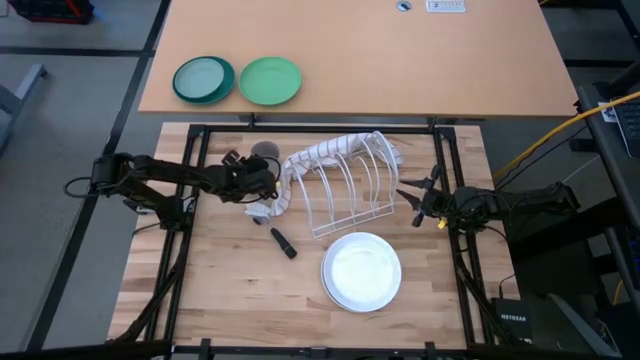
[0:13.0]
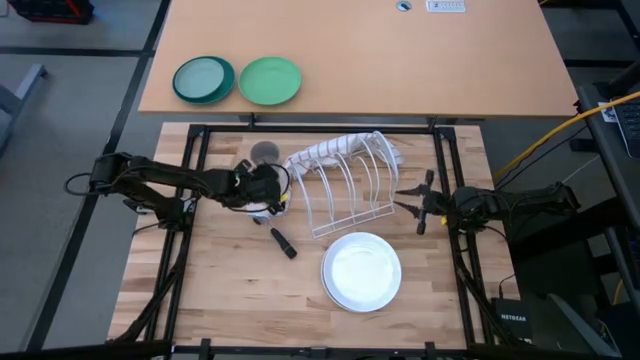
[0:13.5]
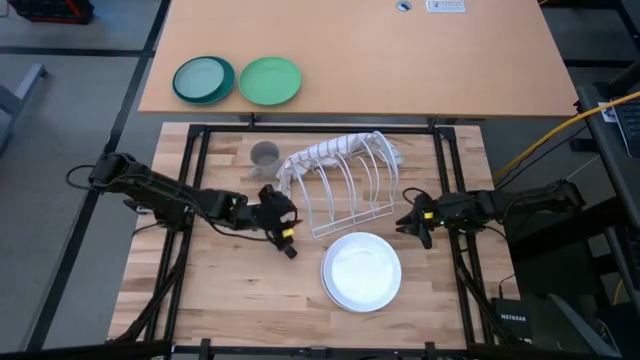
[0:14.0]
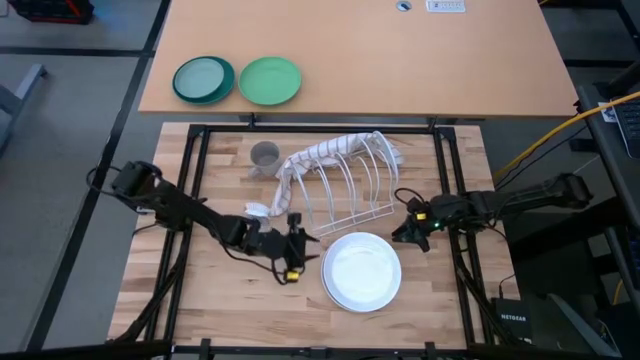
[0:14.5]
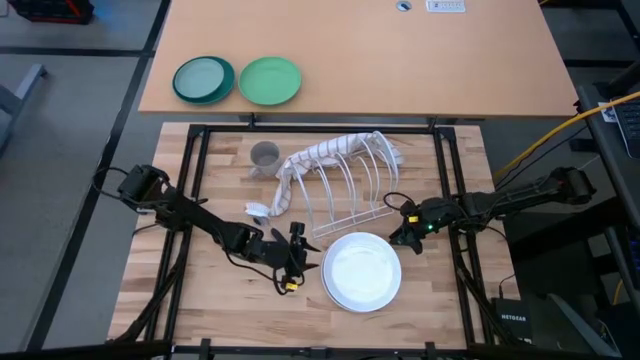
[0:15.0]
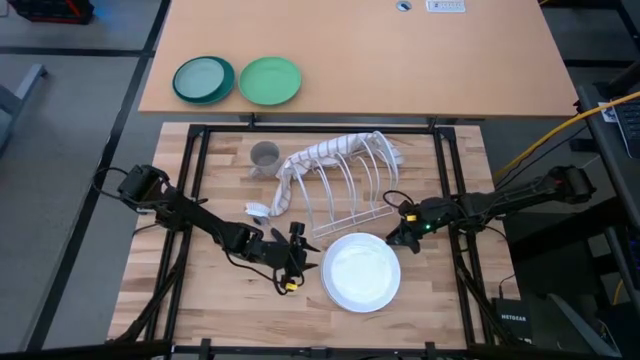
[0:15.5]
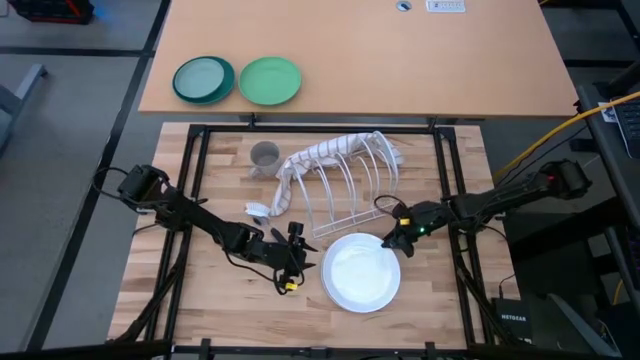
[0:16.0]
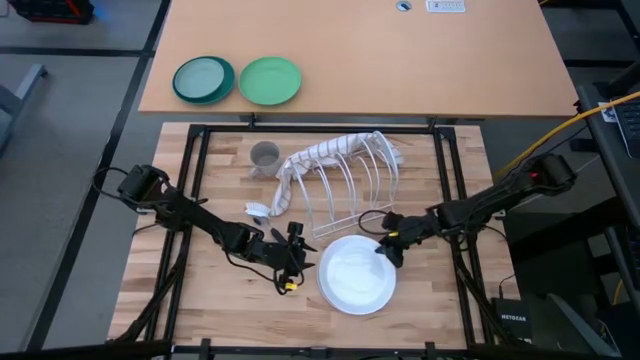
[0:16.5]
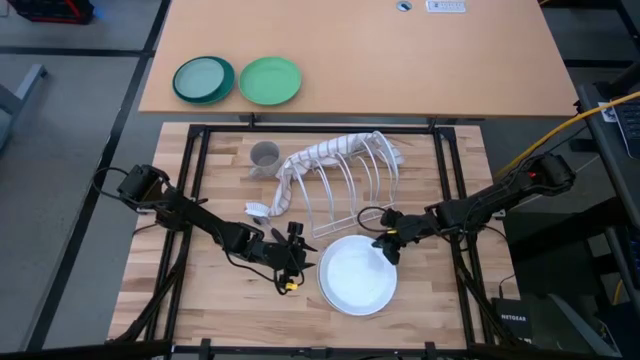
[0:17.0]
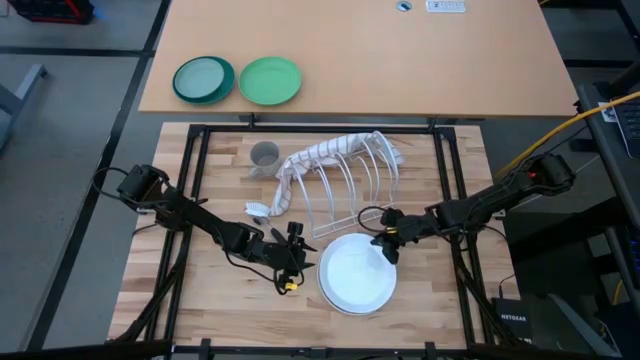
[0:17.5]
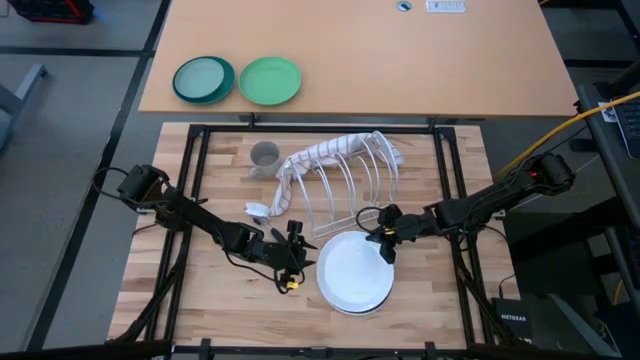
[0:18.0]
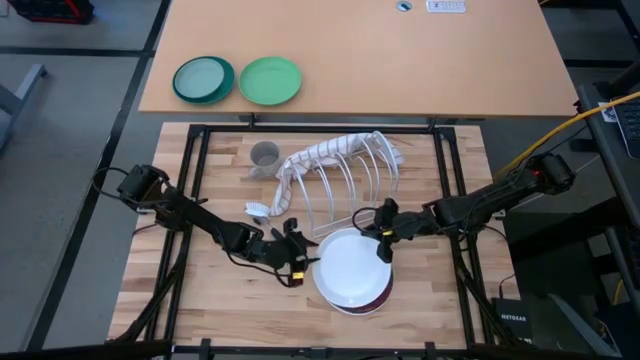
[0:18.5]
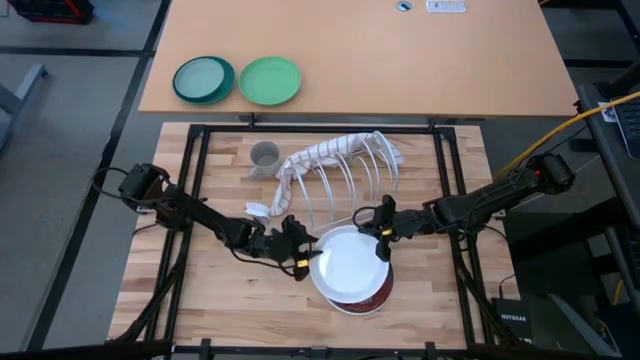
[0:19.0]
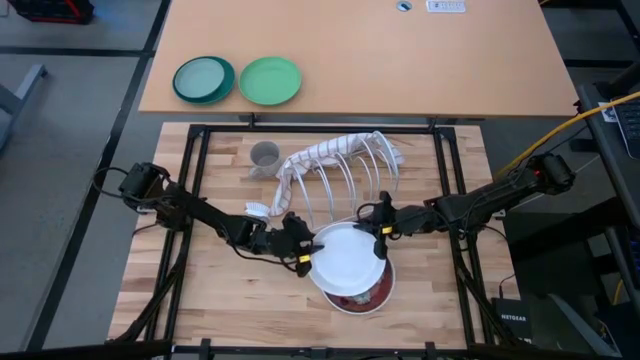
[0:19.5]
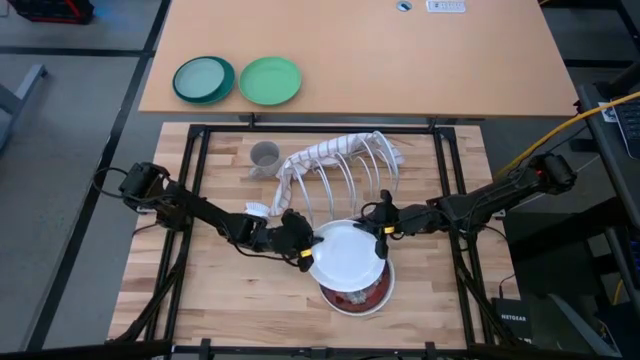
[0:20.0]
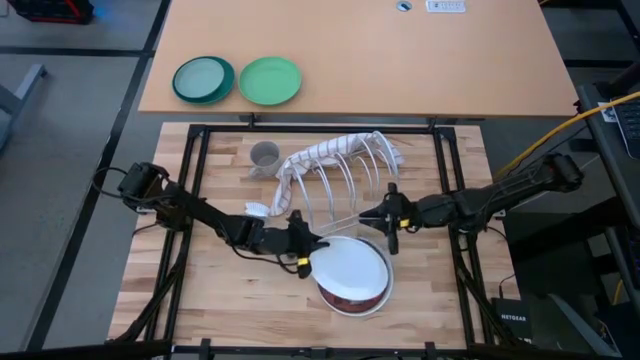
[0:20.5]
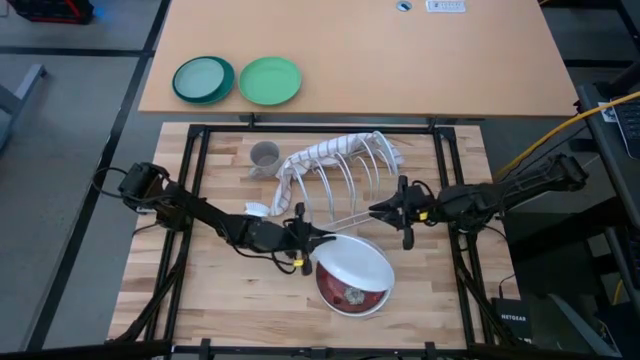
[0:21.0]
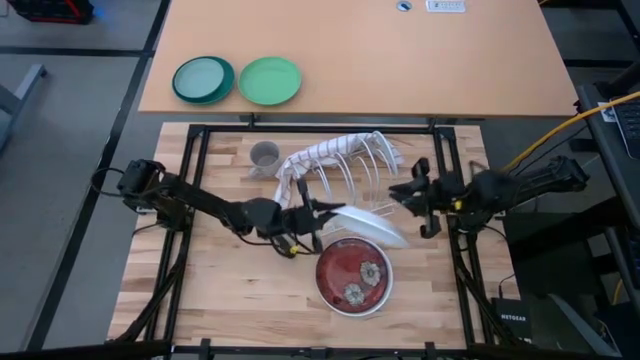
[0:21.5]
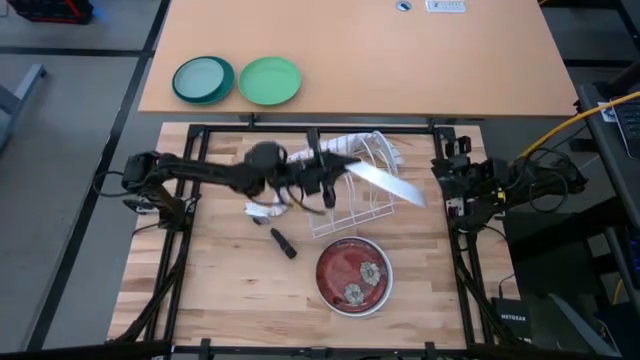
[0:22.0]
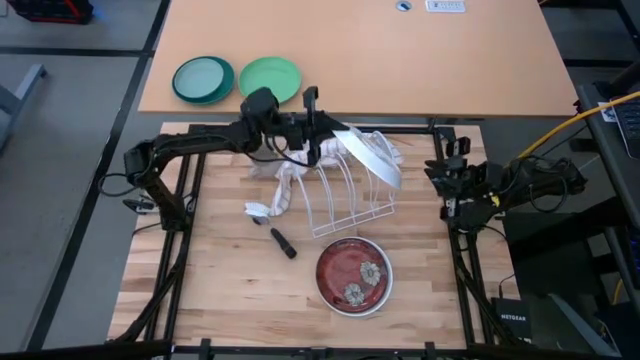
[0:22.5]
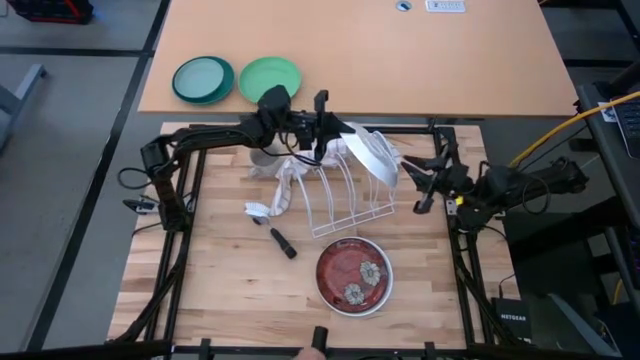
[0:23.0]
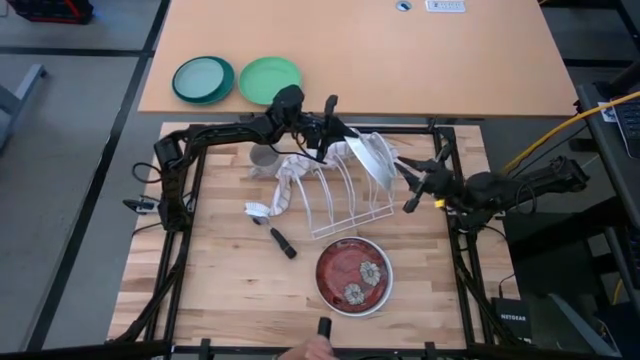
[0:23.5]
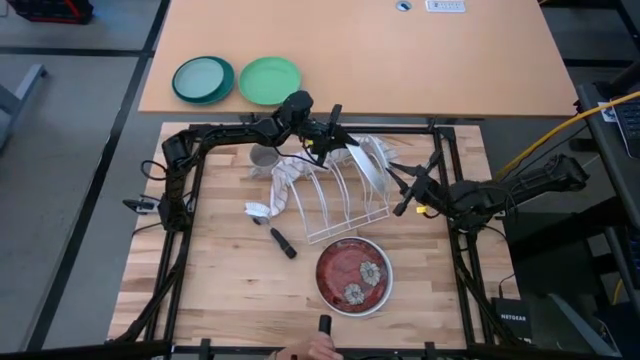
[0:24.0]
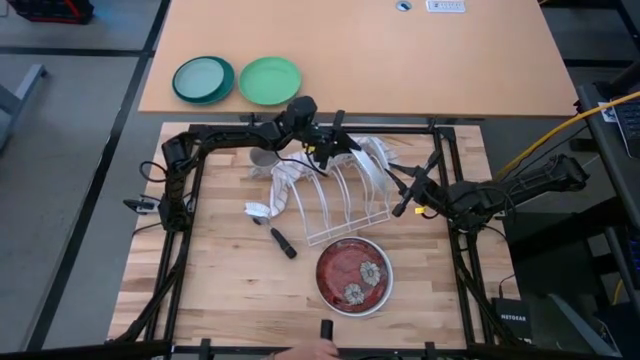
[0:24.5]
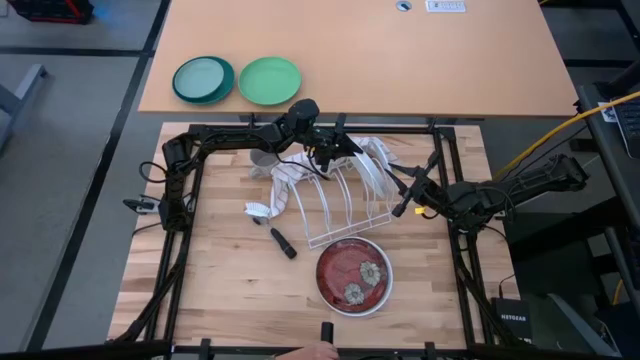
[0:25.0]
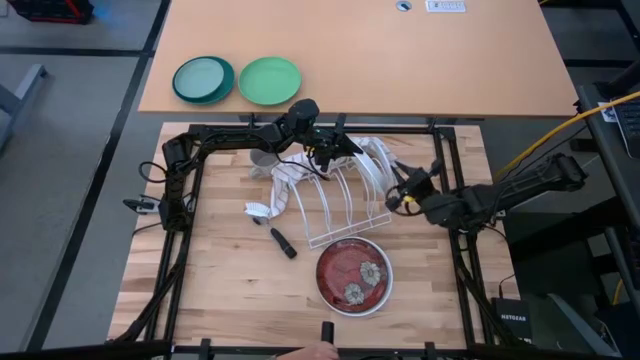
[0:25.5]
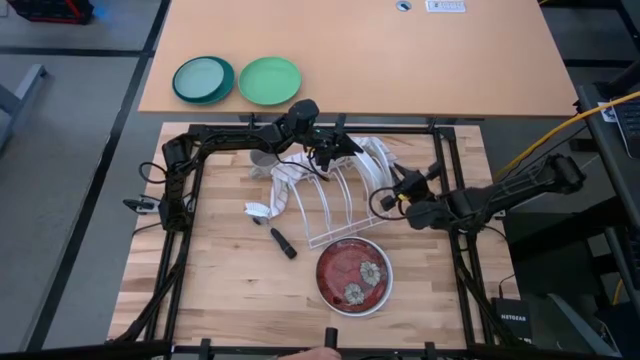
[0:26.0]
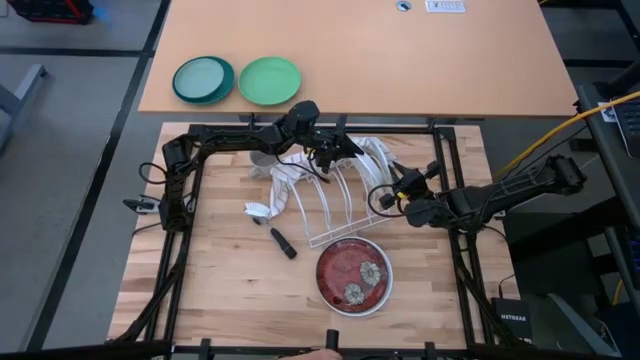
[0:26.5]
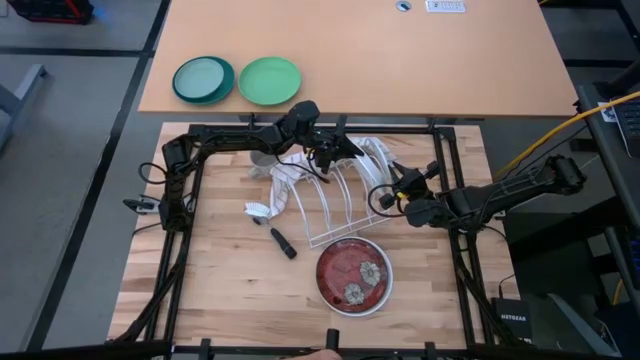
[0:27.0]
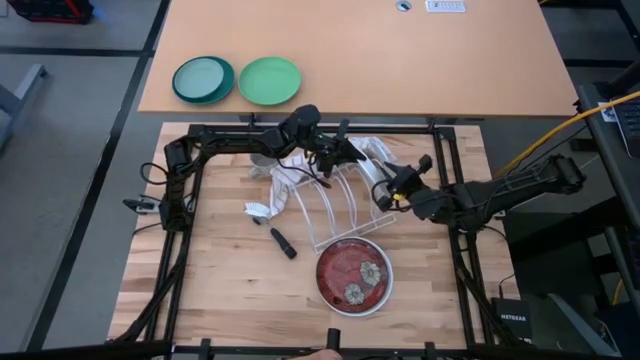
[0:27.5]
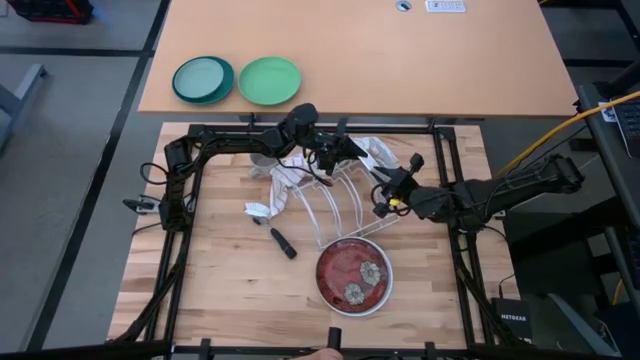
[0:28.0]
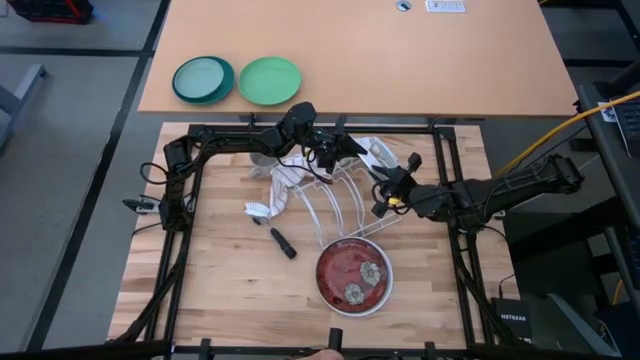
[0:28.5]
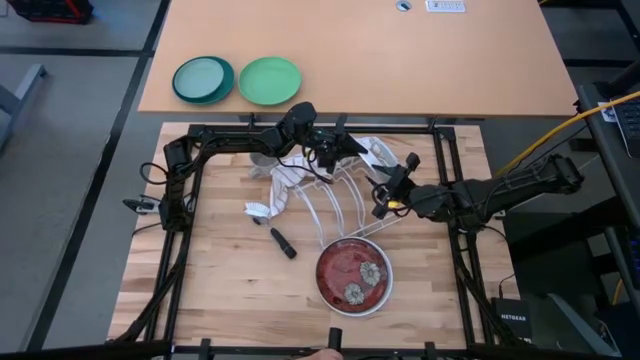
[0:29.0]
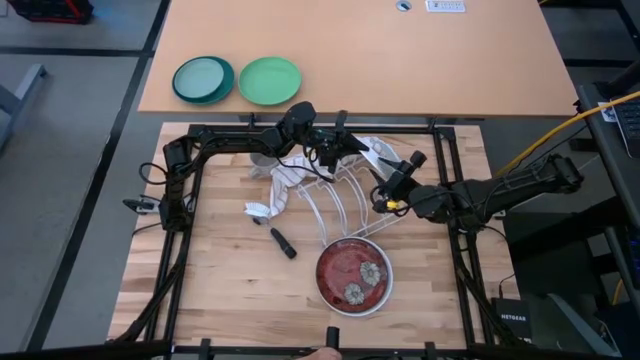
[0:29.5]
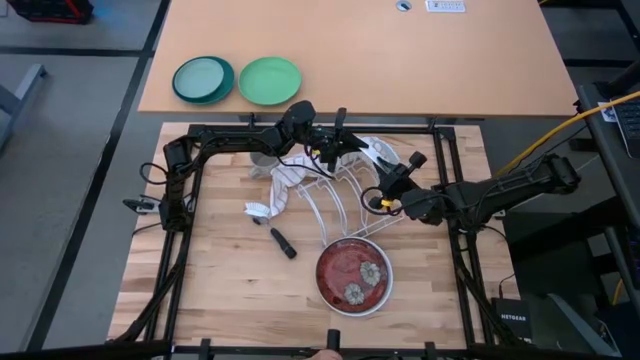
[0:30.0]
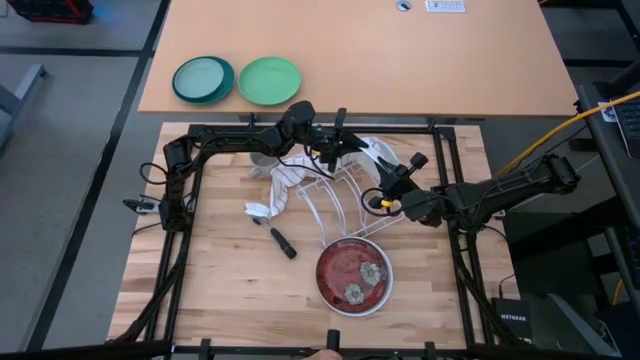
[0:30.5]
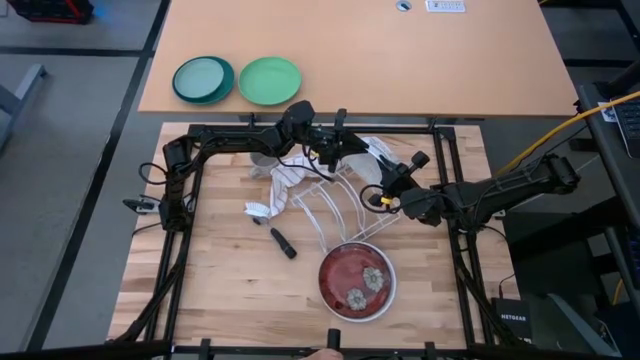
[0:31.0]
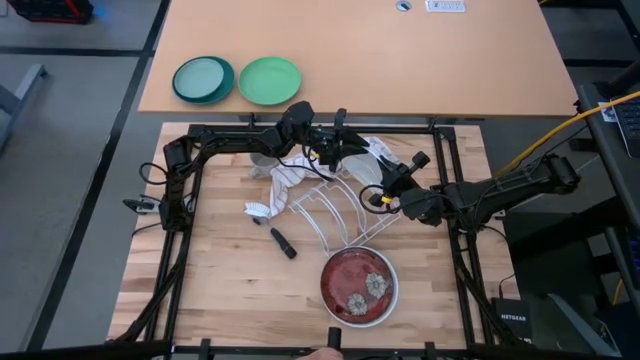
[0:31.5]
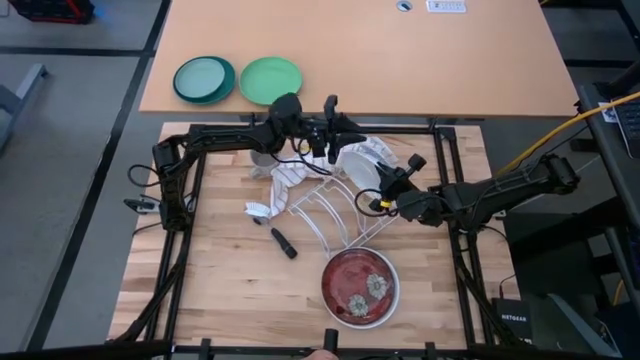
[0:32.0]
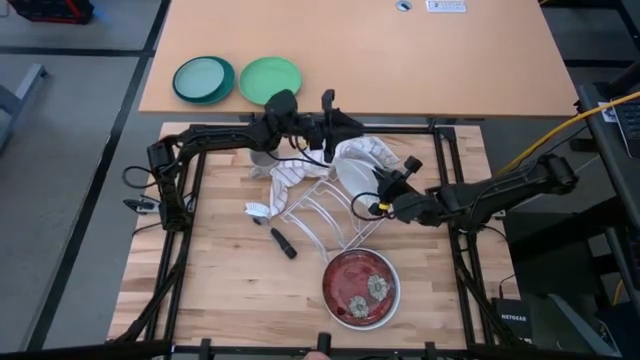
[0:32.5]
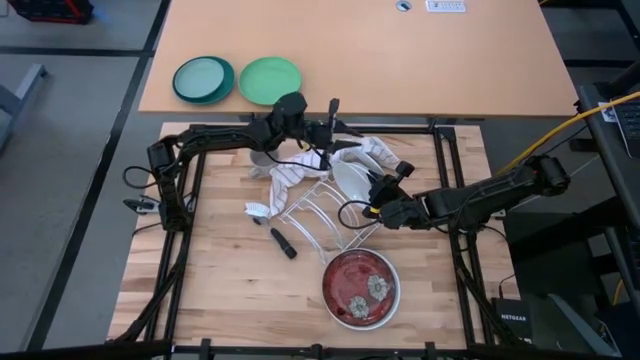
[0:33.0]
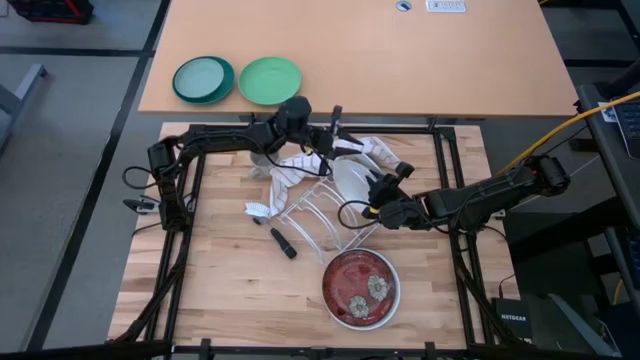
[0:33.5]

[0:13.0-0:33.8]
Task: Sort dishes
Put the white plate in the dish rack
